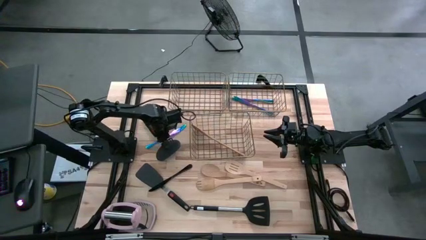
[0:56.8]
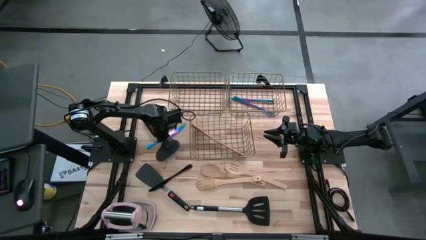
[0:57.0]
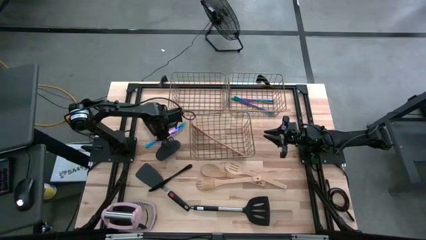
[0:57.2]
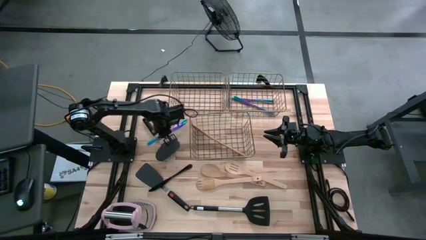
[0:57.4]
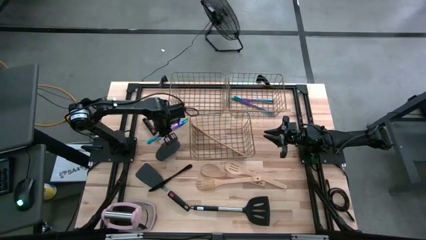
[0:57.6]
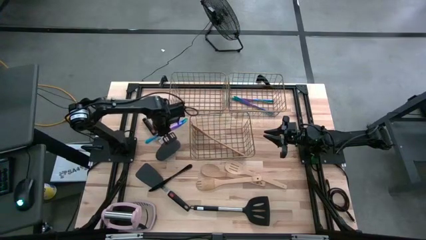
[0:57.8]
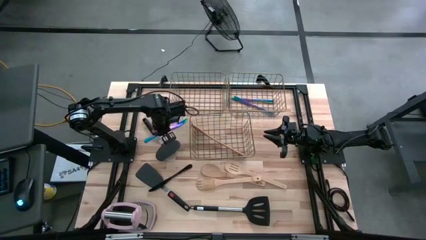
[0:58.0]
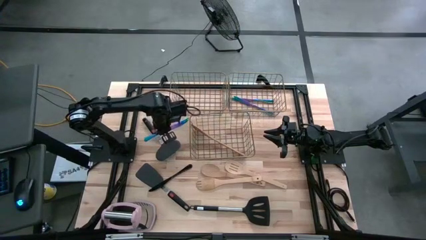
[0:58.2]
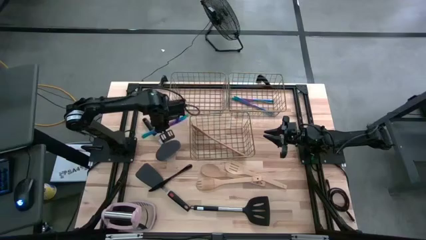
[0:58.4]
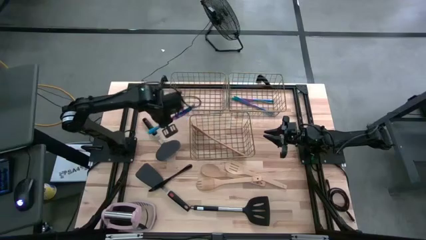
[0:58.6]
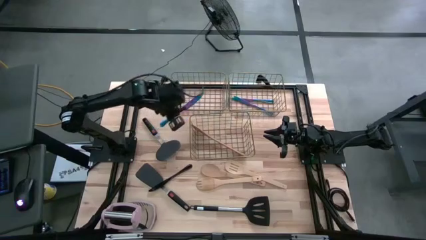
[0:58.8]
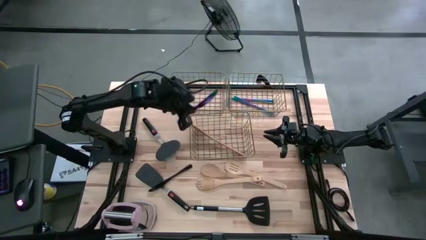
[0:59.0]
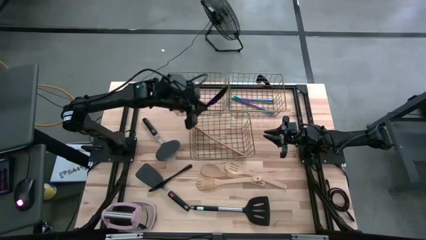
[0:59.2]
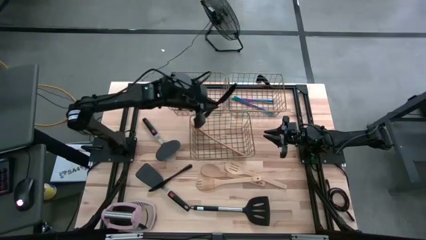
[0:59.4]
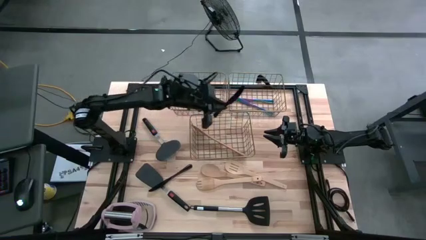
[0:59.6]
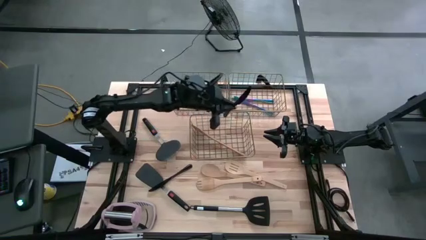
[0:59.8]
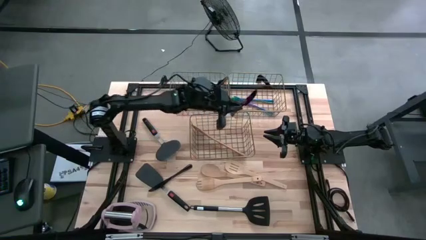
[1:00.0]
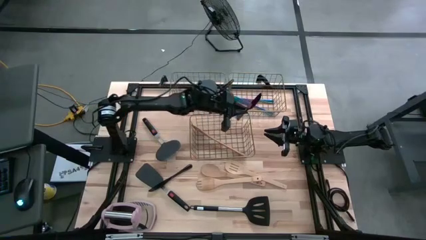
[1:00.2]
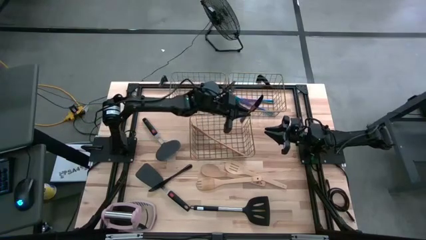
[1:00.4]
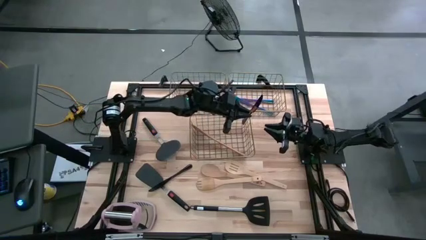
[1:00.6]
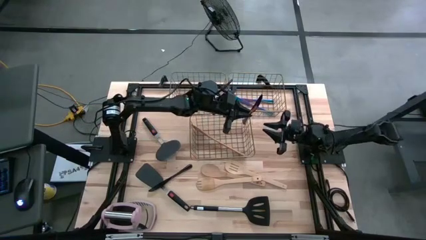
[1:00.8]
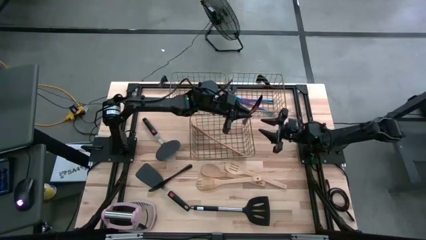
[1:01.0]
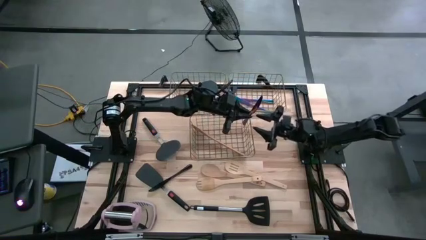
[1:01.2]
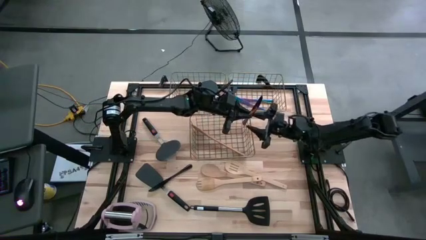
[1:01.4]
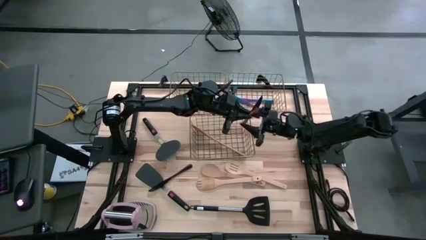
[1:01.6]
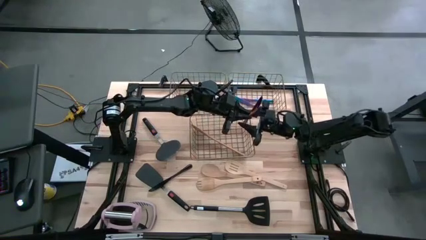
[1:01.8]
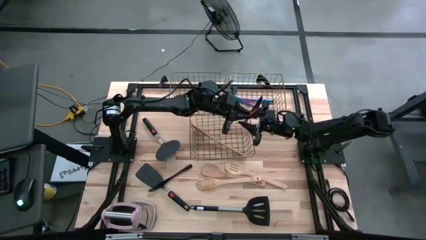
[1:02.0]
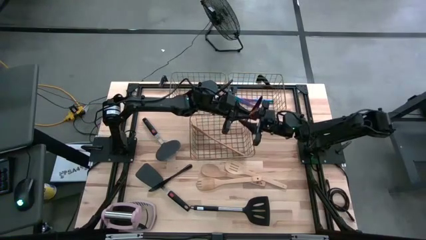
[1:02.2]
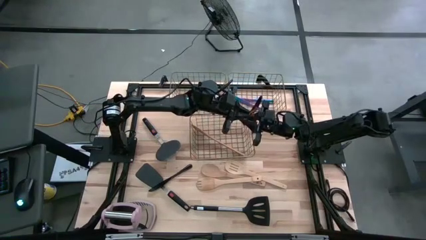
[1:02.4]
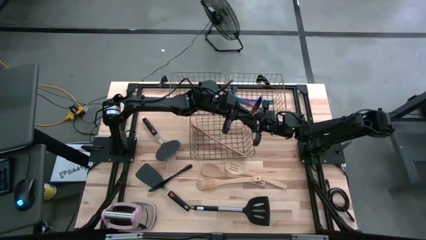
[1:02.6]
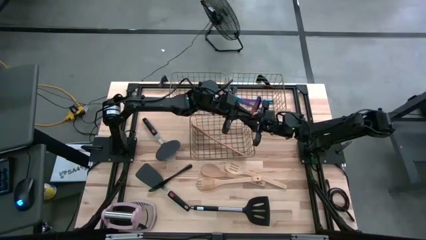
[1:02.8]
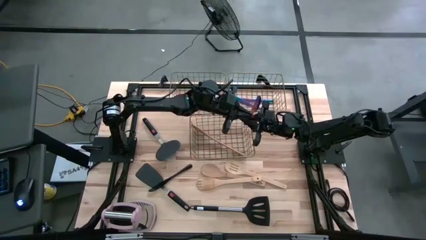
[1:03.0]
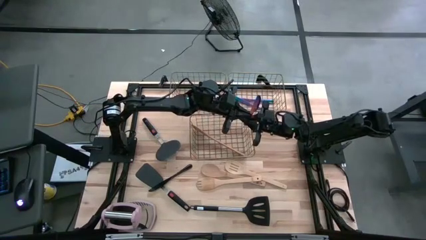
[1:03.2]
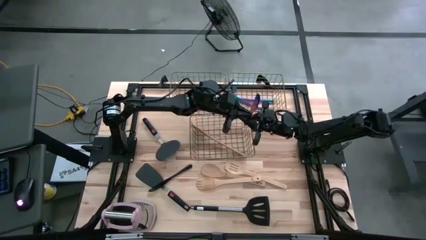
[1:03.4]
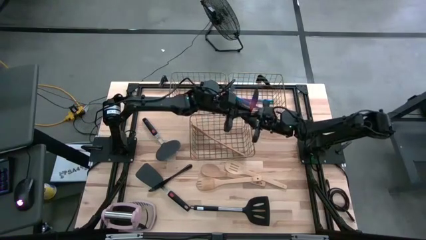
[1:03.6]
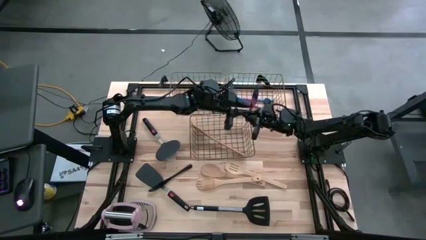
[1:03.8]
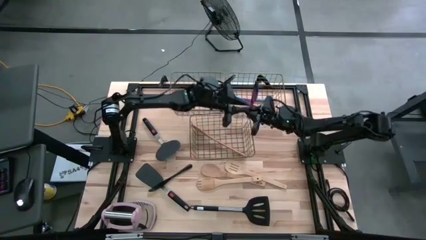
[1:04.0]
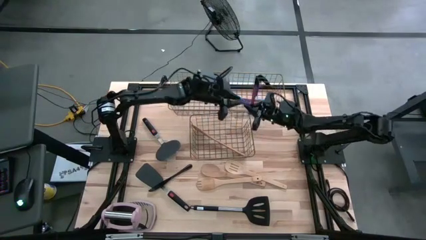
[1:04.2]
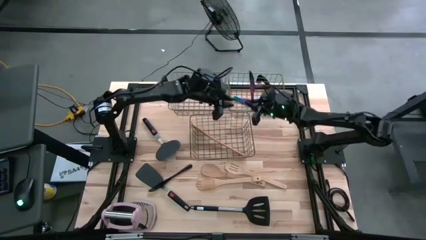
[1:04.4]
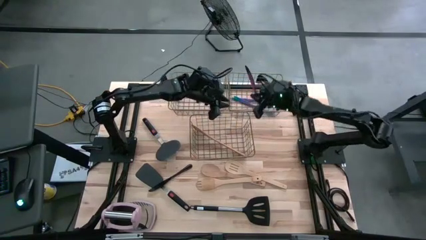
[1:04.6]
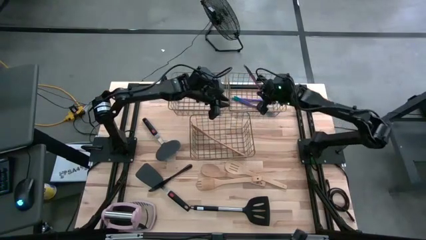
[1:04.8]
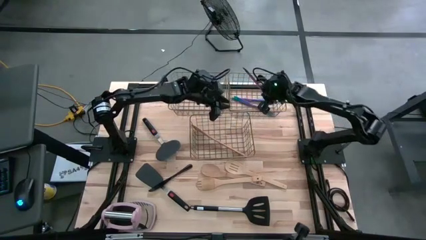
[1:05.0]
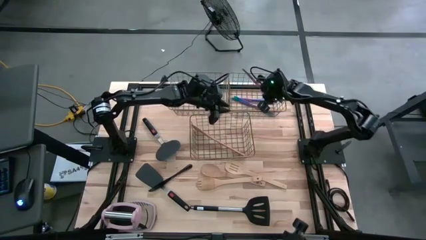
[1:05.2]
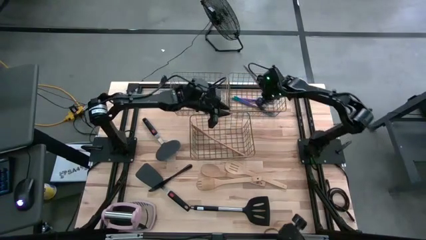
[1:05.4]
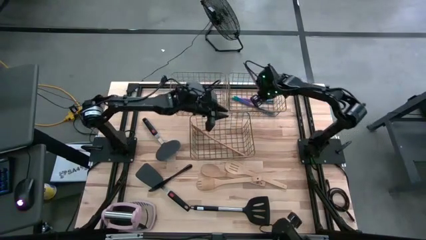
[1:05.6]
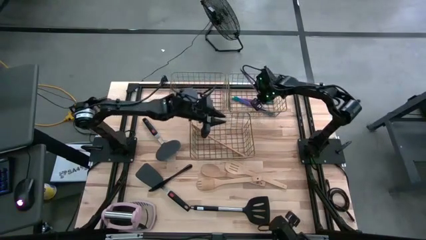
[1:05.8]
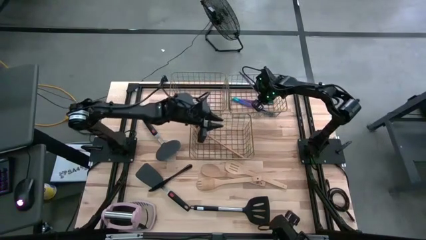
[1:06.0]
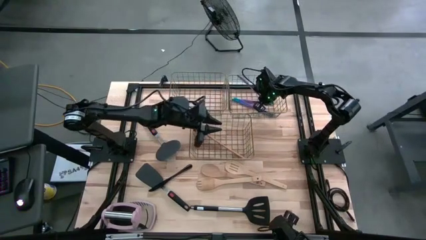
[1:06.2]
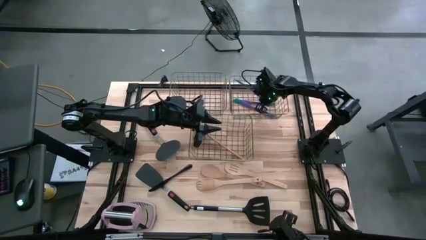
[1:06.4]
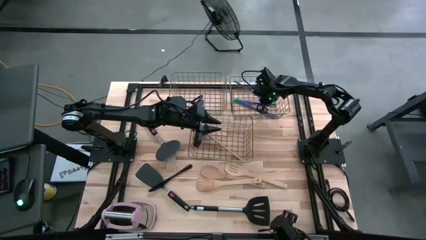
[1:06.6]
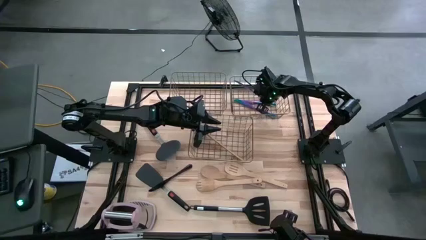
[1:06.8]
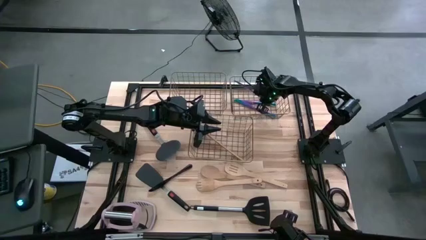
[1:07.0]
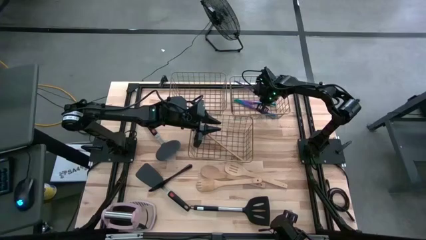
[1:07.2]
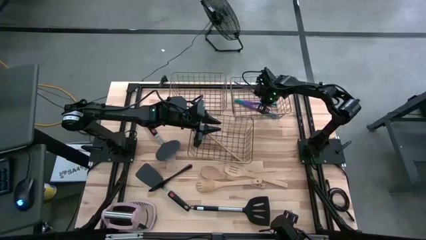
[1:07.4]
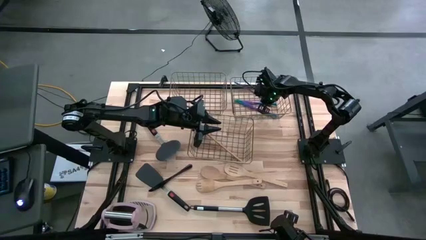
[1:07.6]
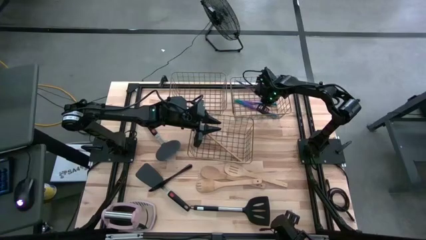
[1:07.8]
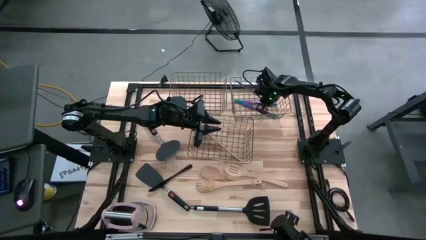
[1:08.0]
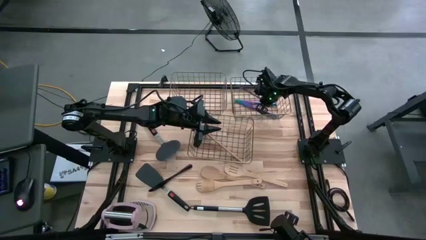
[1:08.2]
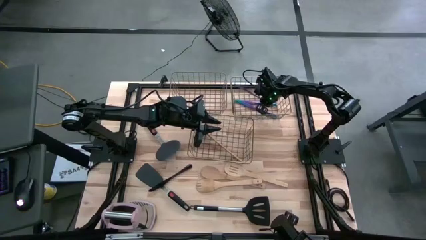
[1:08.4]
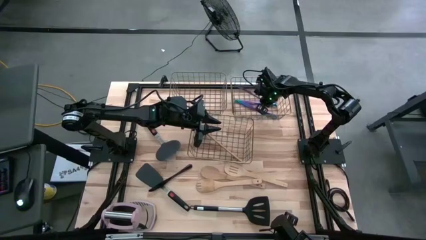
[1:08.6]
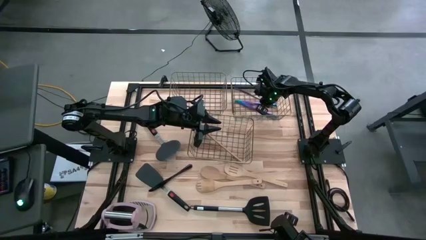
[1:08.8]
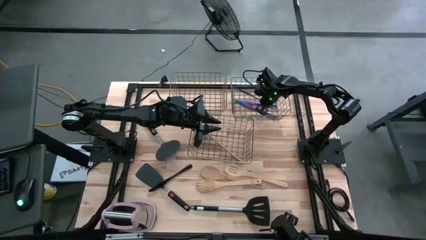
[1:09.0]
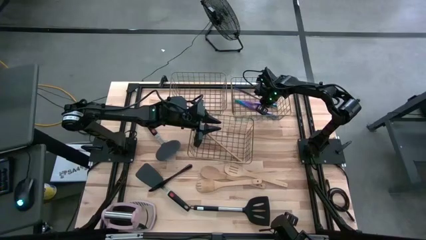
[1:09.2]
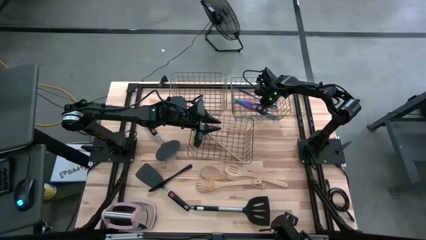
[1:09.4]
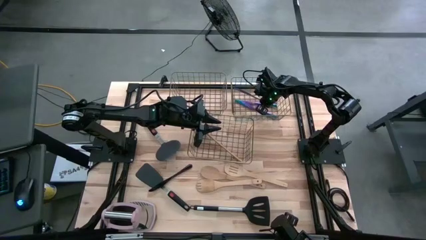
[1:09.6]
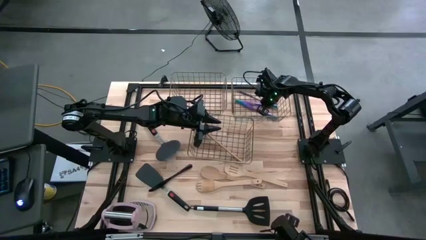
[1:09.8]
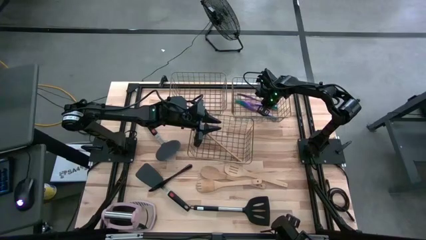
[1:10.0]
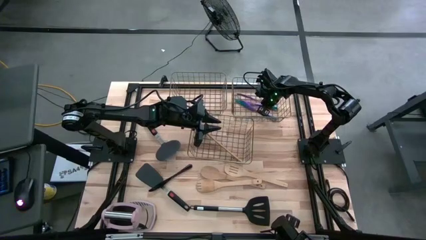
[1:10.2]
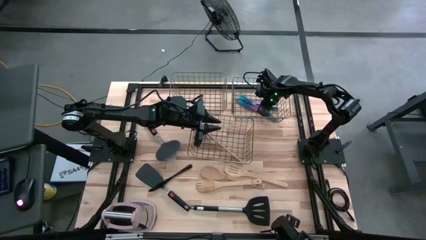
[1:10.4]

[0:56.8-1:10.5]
Task: Pick & Place Kitchen Items
Put the blue table knife into the top right wire basket
